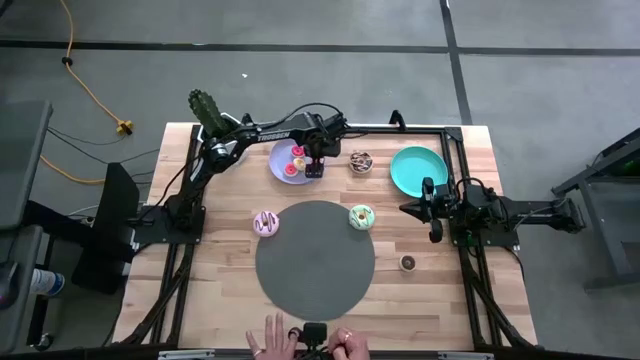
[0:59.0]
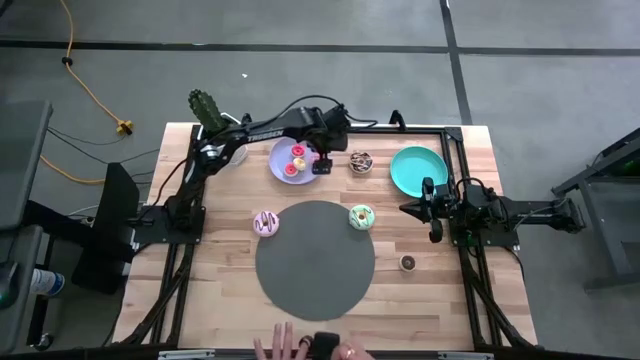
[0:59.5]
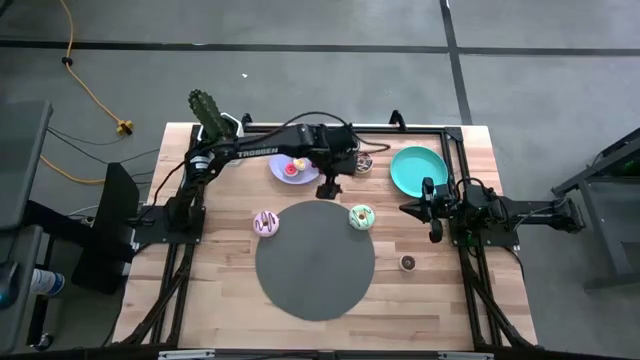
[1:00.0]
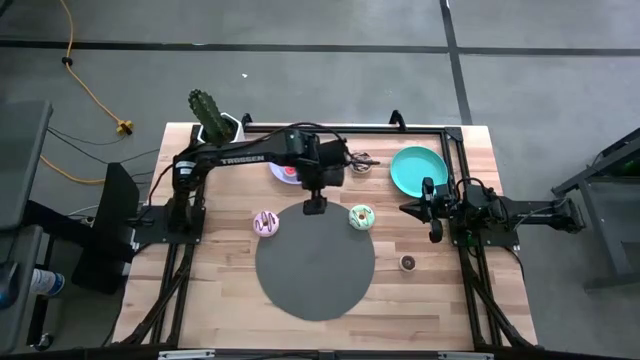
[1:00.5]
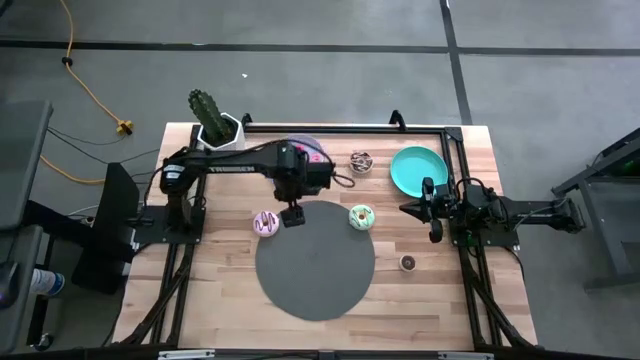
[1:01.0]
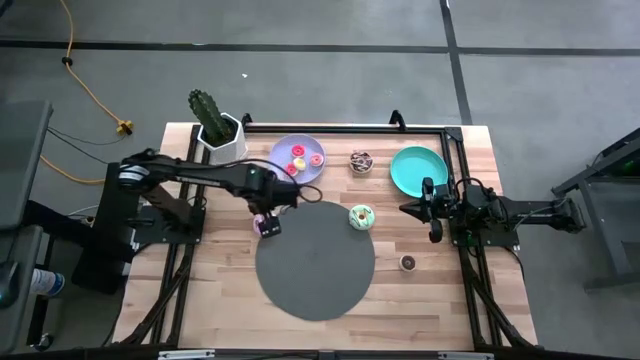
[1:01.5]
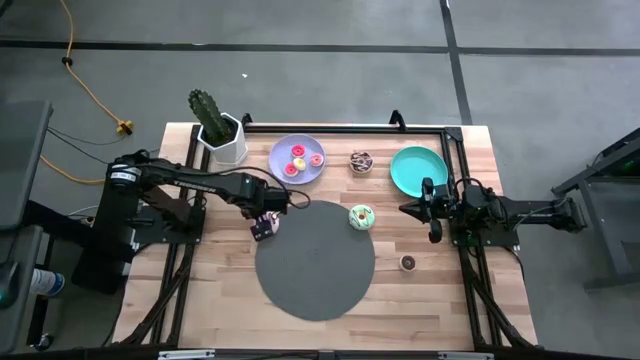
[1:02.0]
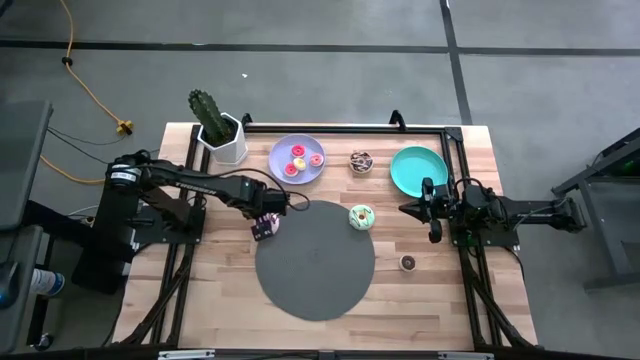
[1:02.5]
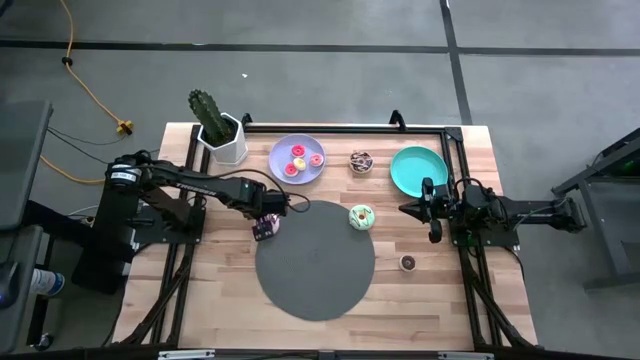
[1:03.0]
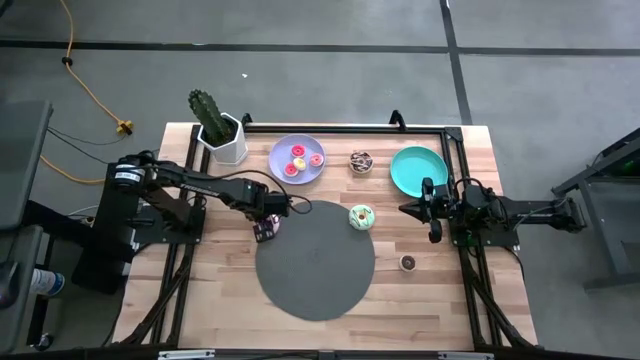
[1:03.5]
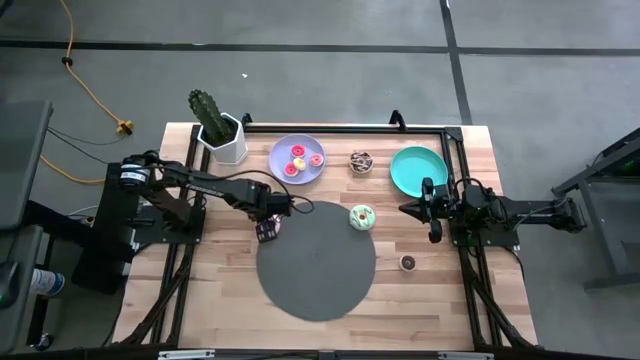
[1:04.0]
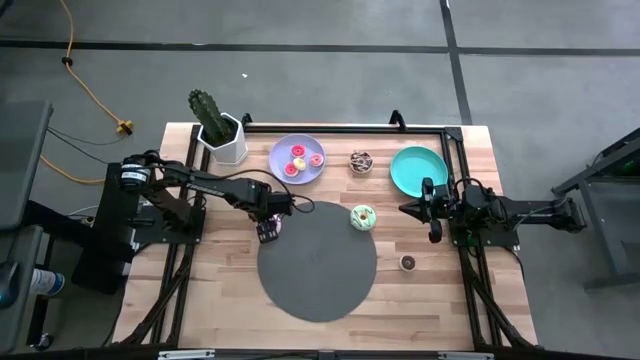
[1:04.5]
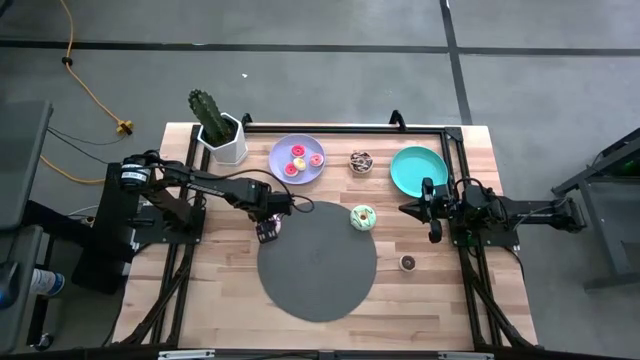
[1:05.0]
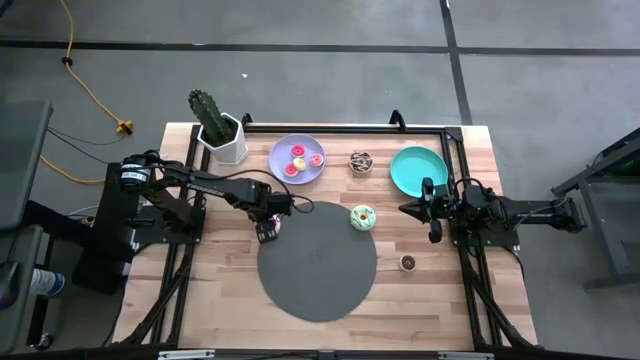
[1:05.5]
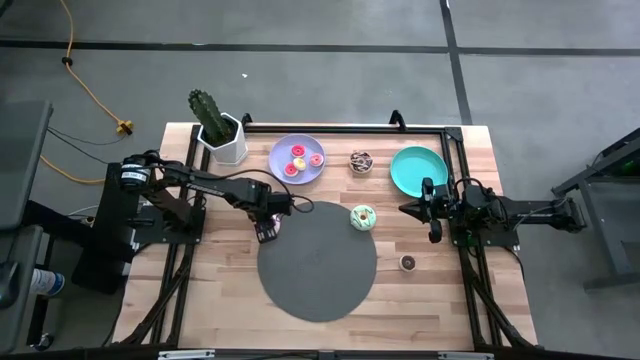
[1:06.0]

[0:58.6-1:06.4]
Task: Pick & Place donuts
Put the large purple doughnut on the blue plate

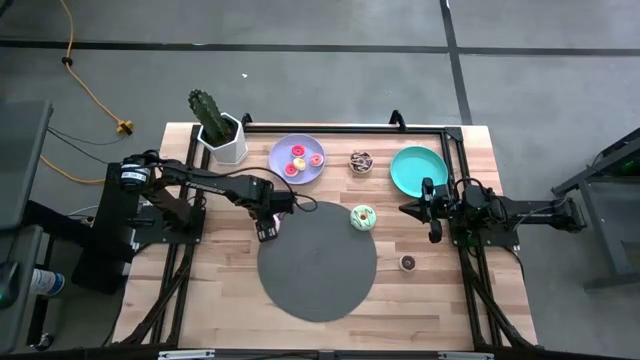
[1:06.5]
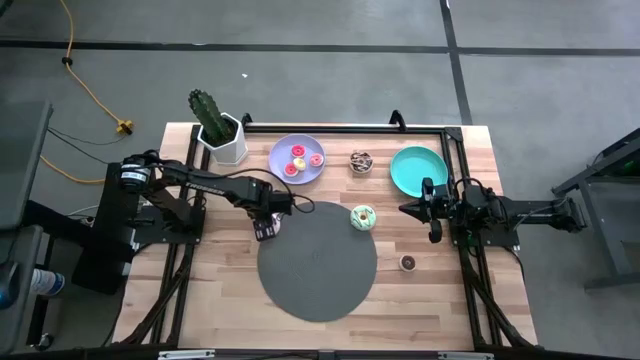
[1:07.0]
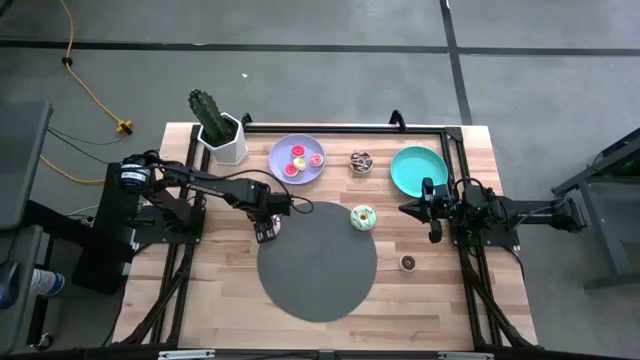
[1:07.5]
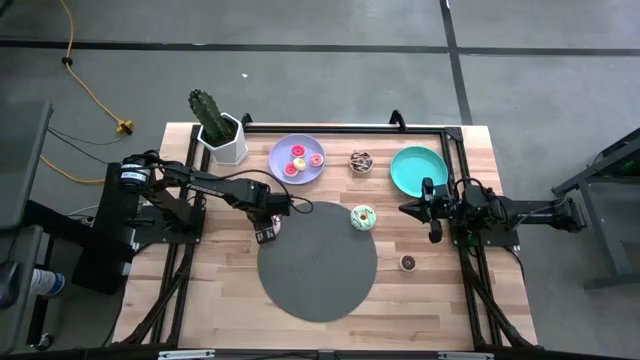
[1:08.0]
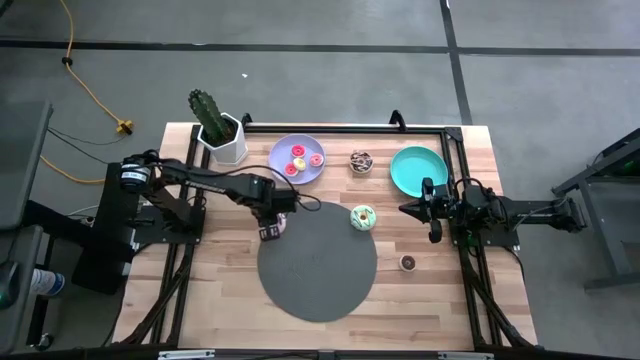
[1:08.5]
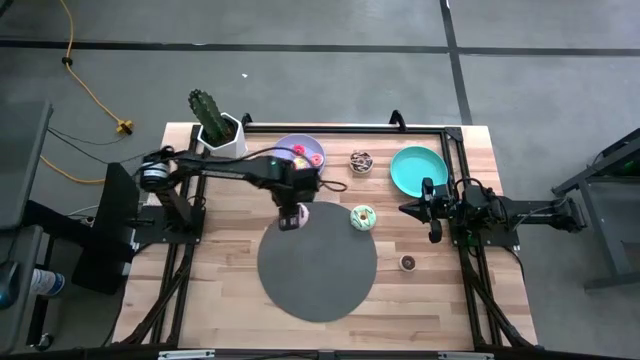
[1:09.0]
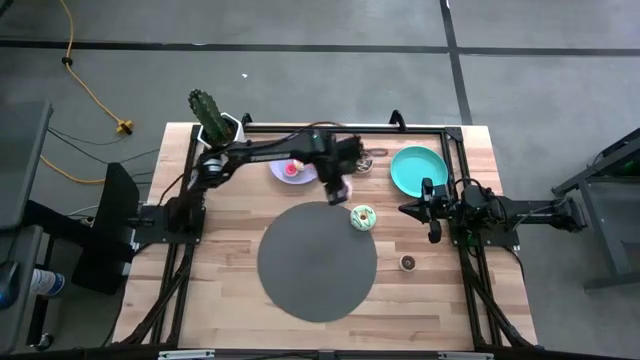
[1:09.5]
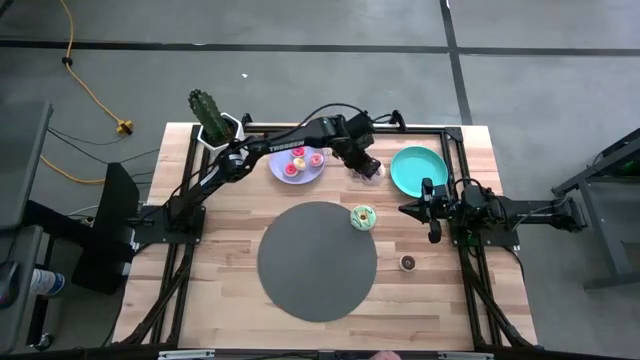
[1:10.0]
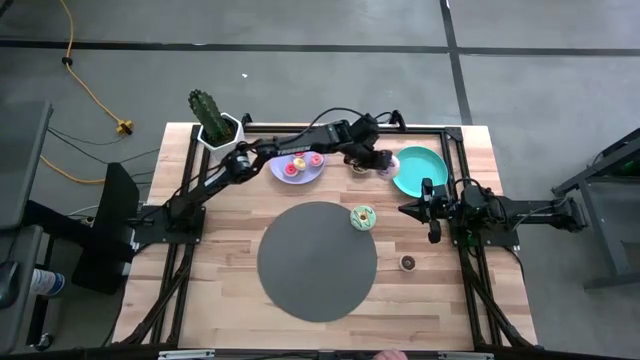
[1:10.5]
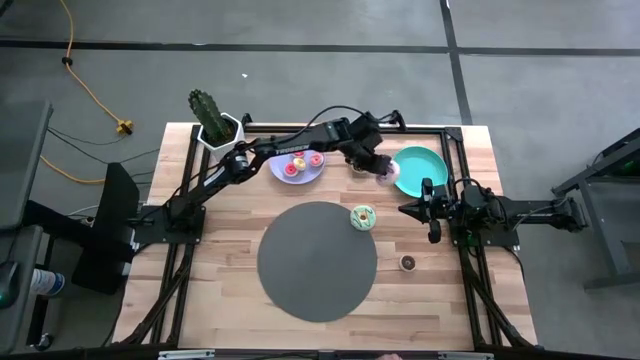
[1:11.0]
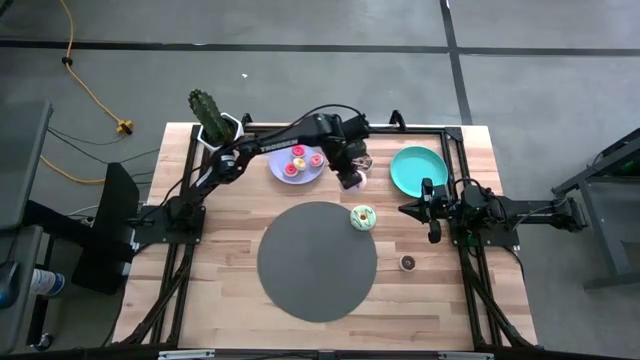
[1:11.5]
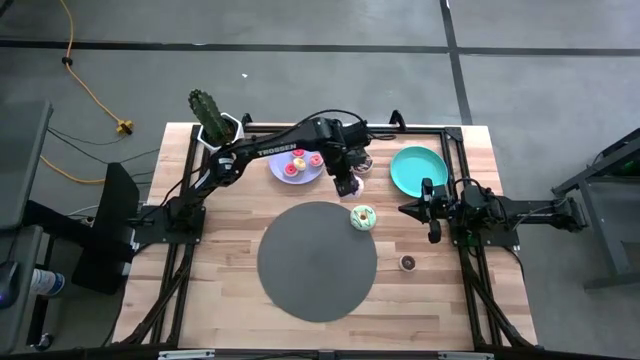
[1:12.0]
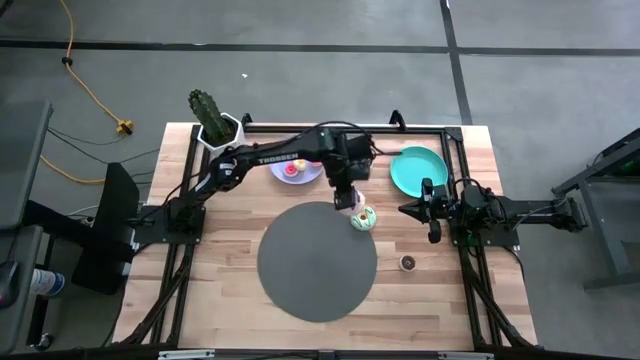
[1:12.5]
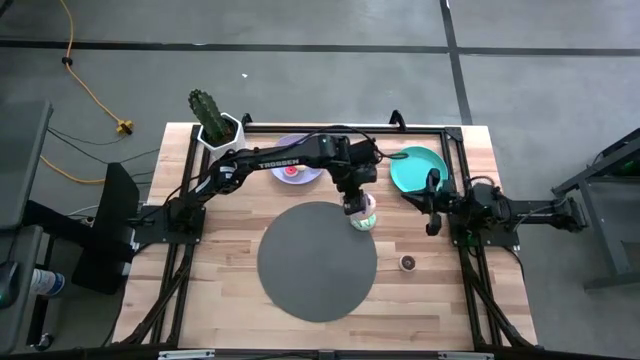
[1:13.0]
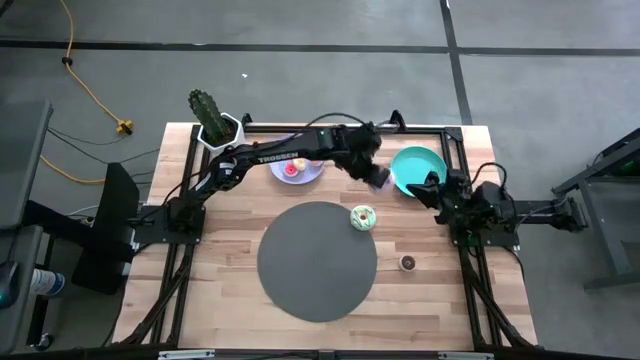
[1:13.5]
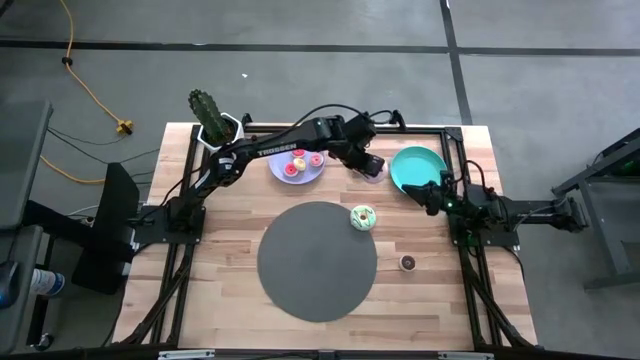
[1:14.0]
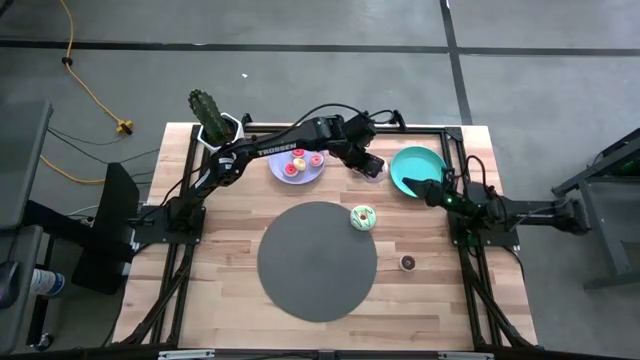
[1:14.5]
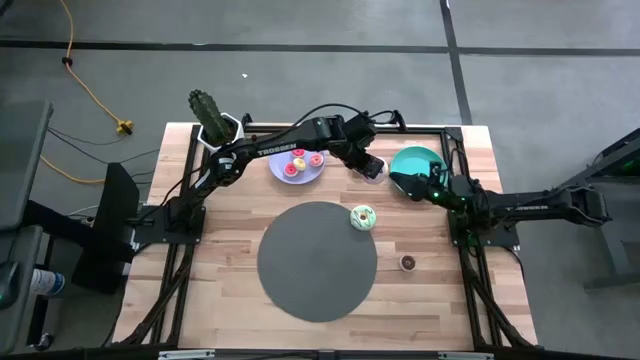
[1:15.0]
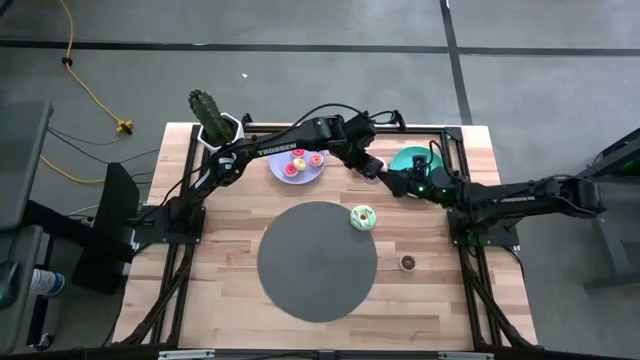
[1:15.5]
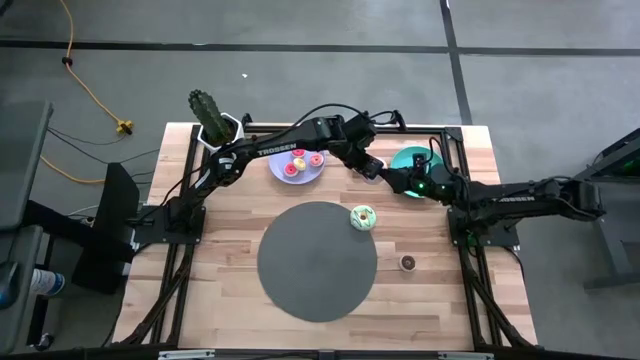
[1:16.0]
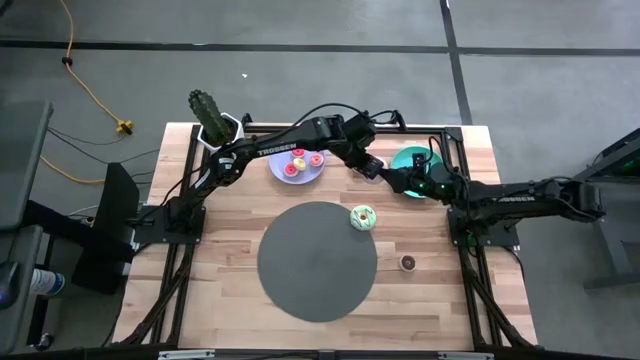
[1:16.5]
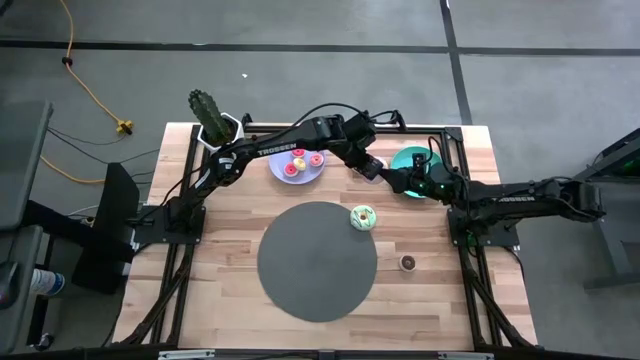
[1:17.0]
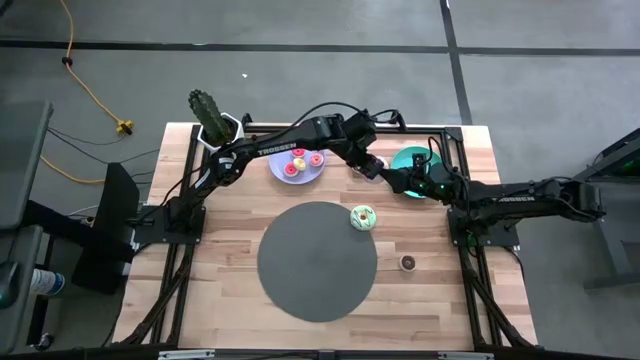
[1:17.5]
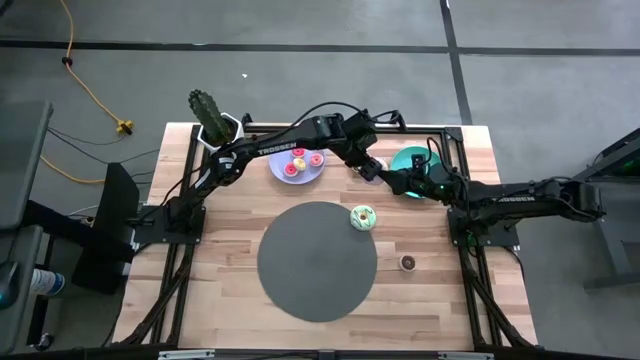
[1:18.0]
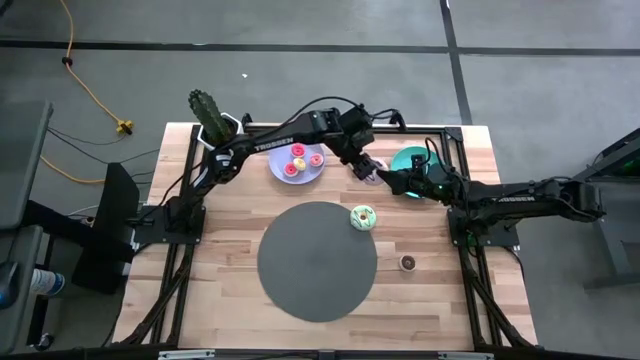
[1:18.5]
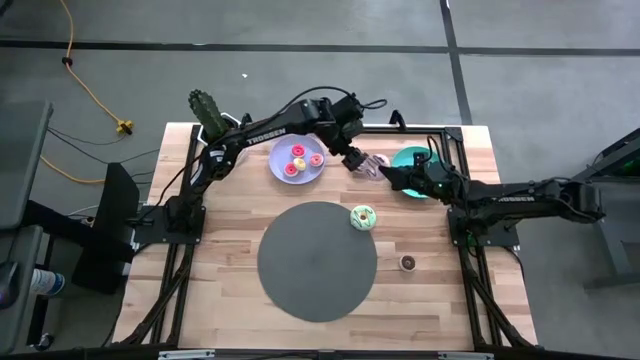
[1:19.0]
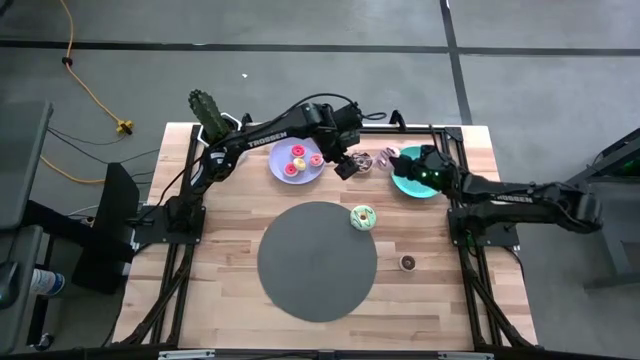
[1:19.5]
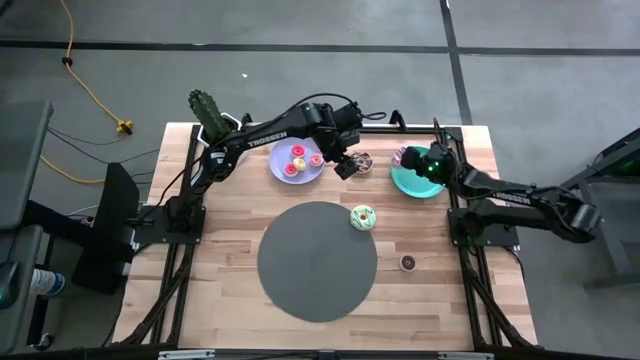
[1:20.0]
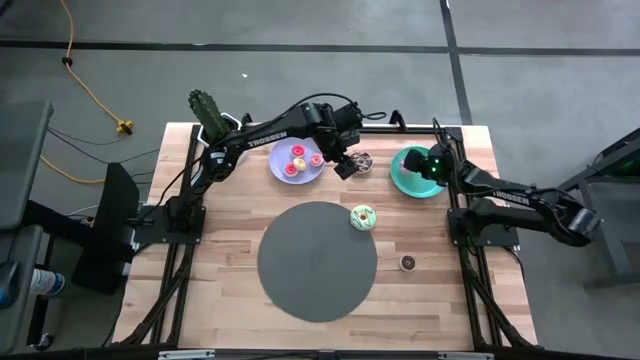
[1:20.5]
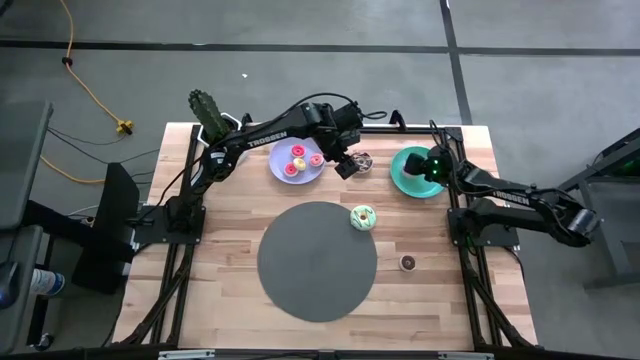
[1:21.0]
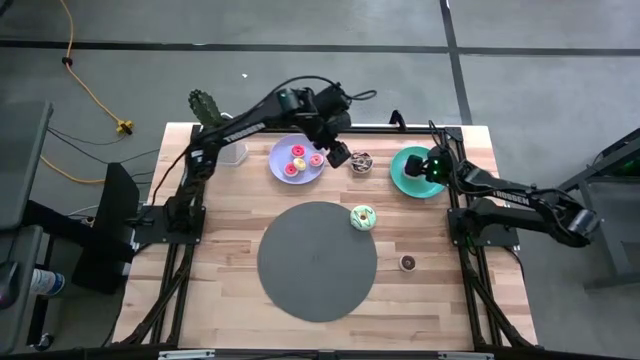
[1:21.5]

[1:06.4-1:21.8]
Put the large purple doughnut on the blue plate
